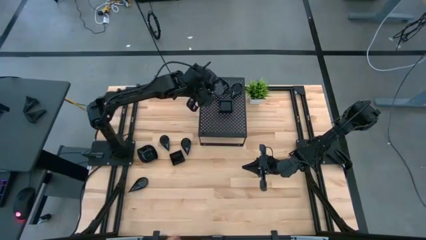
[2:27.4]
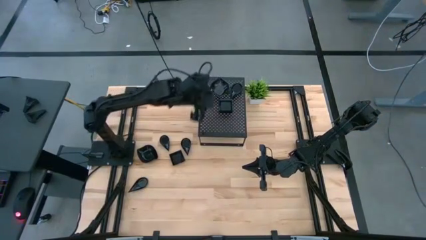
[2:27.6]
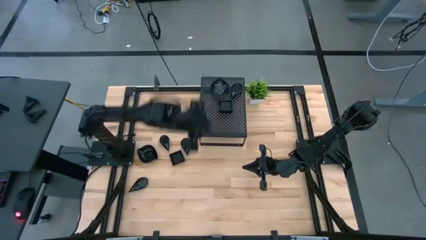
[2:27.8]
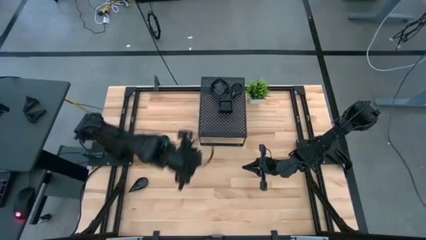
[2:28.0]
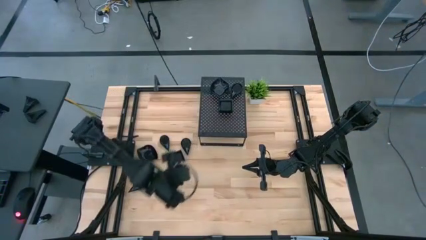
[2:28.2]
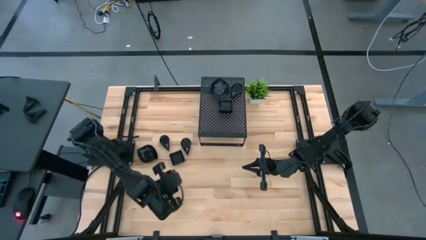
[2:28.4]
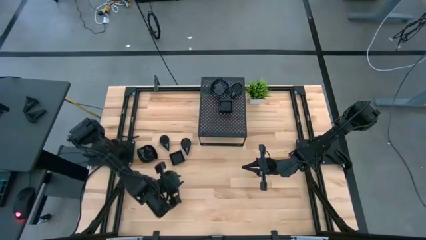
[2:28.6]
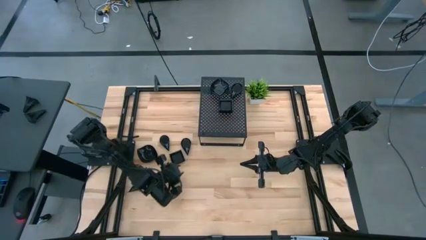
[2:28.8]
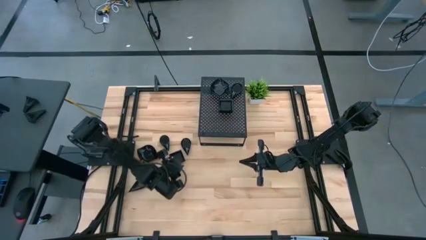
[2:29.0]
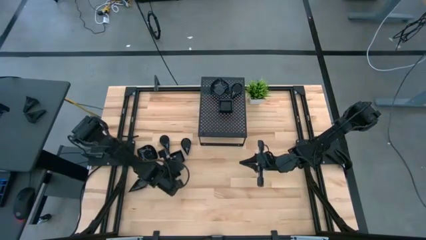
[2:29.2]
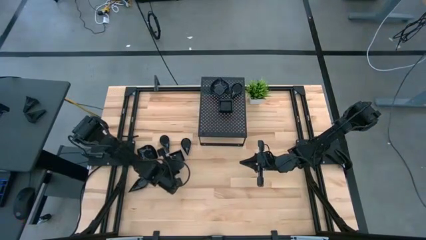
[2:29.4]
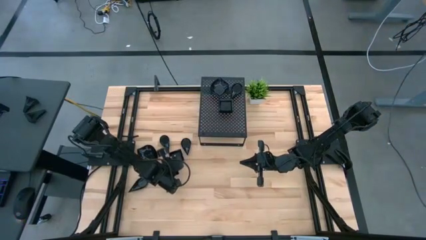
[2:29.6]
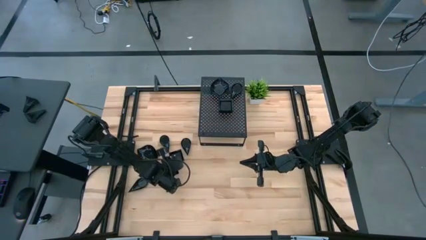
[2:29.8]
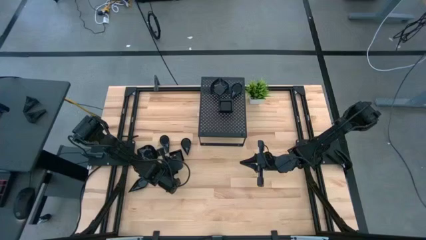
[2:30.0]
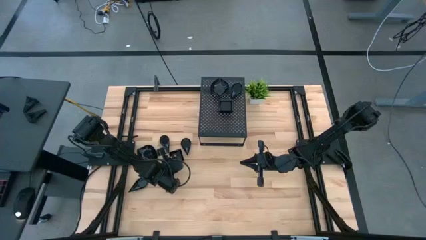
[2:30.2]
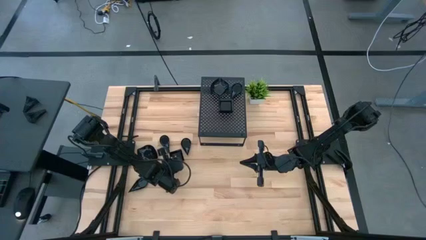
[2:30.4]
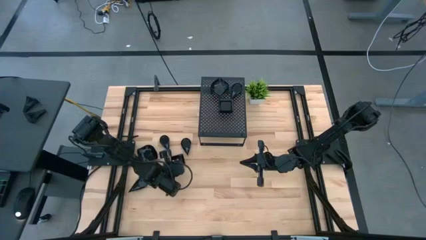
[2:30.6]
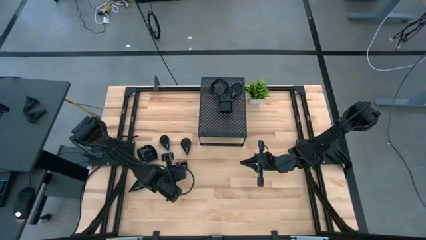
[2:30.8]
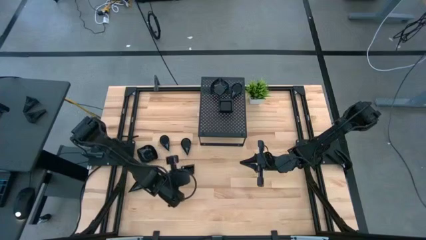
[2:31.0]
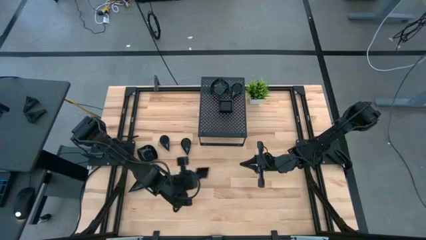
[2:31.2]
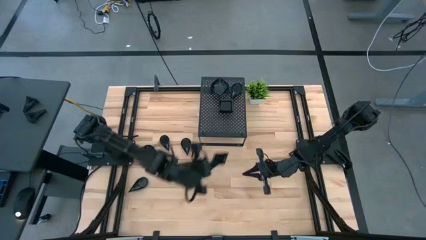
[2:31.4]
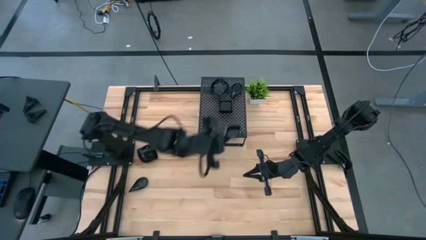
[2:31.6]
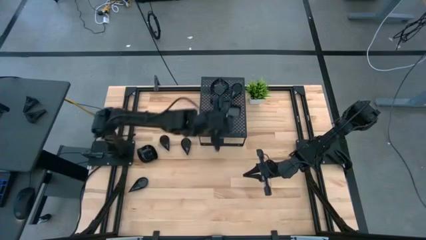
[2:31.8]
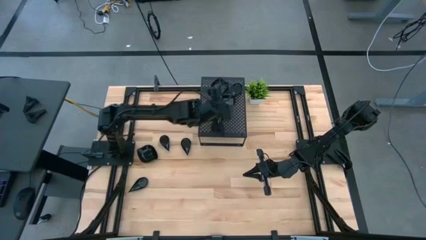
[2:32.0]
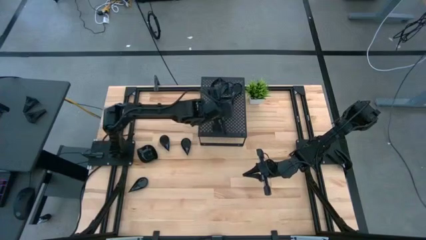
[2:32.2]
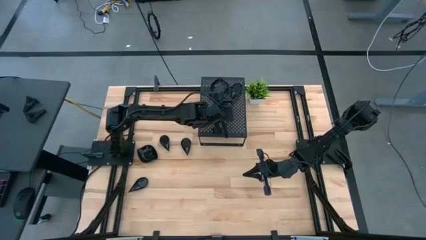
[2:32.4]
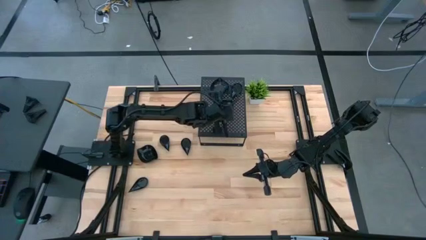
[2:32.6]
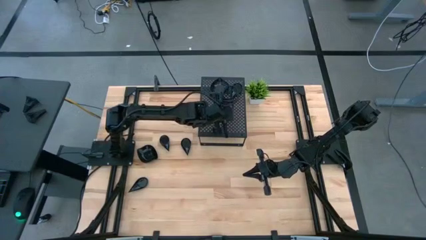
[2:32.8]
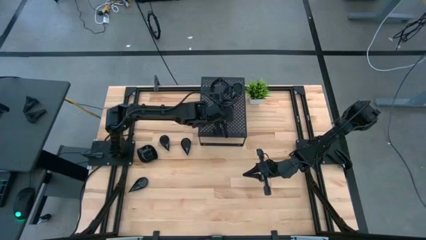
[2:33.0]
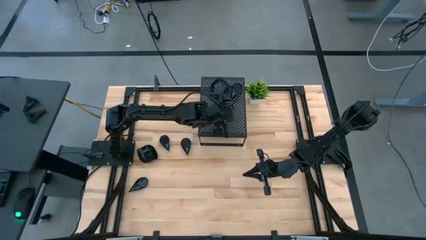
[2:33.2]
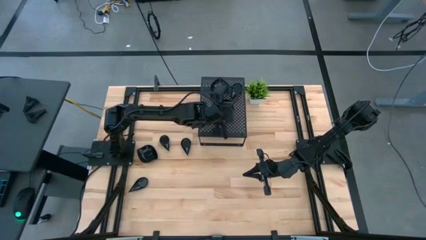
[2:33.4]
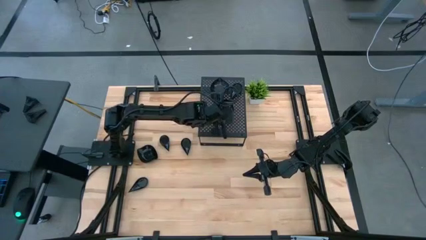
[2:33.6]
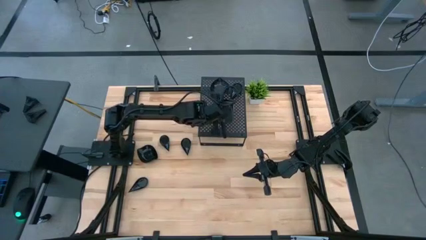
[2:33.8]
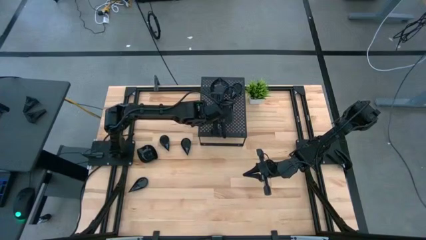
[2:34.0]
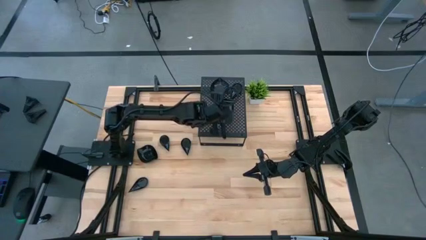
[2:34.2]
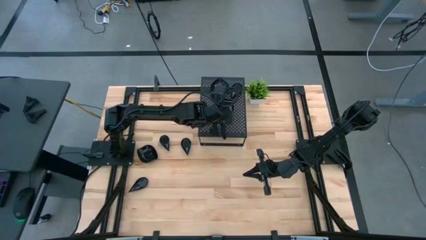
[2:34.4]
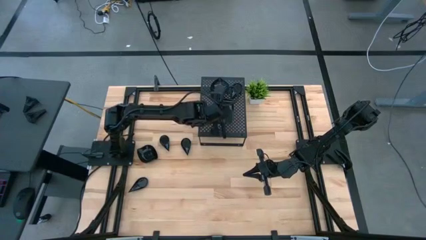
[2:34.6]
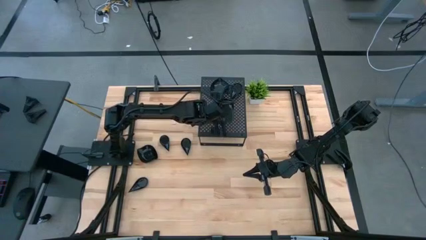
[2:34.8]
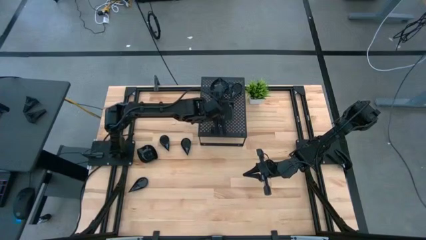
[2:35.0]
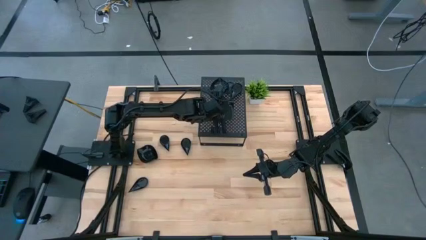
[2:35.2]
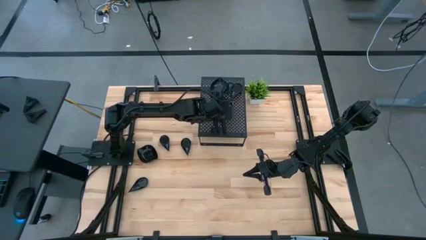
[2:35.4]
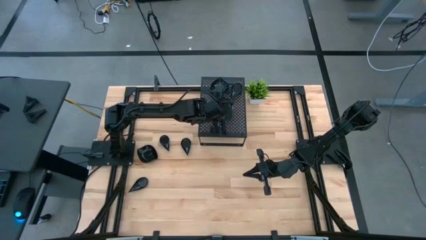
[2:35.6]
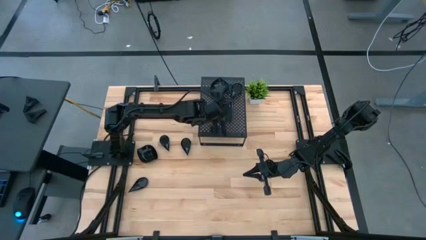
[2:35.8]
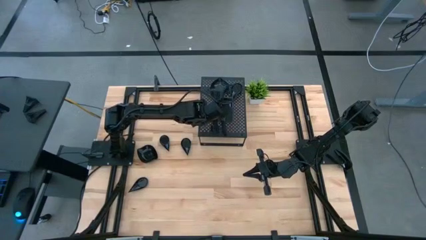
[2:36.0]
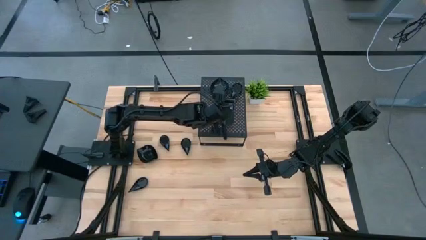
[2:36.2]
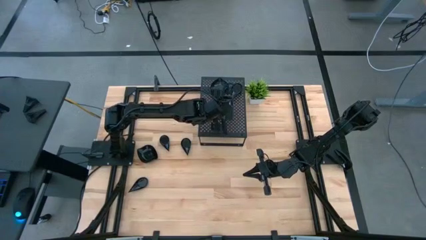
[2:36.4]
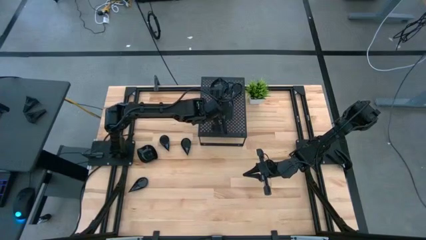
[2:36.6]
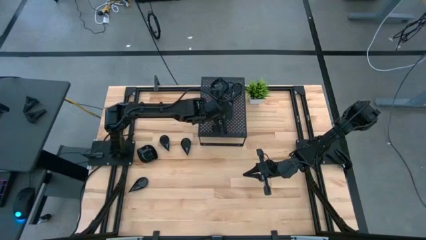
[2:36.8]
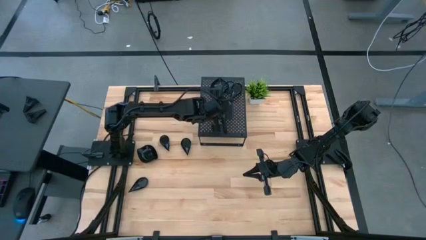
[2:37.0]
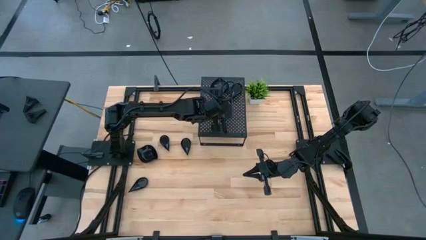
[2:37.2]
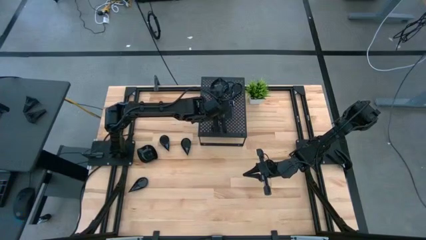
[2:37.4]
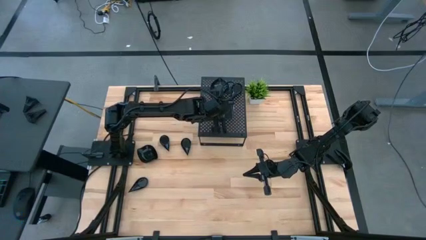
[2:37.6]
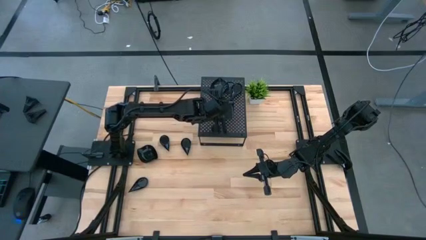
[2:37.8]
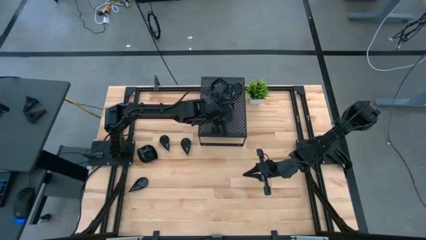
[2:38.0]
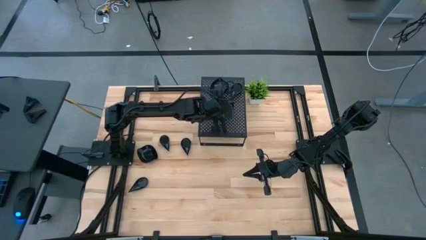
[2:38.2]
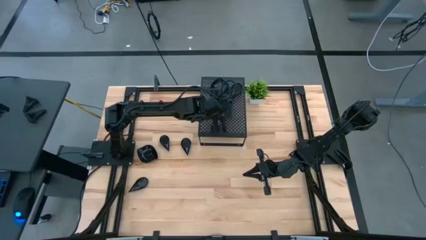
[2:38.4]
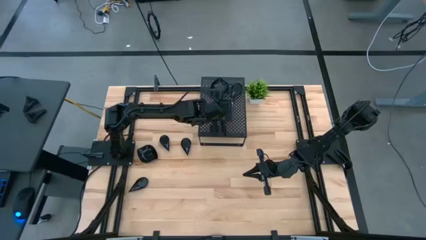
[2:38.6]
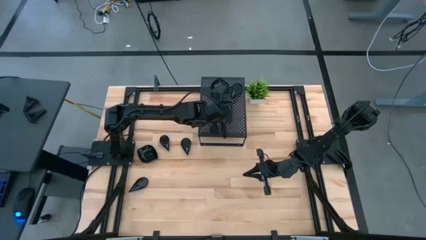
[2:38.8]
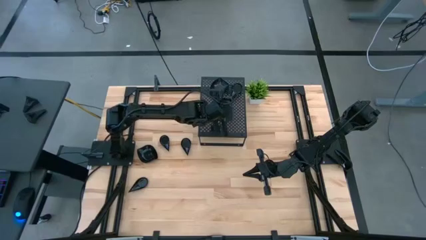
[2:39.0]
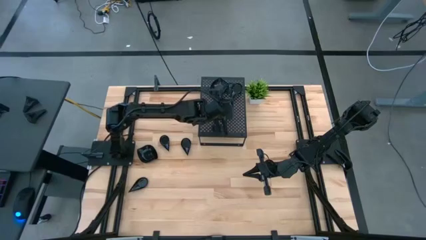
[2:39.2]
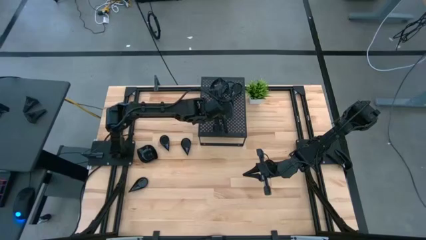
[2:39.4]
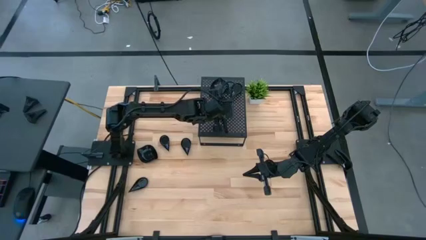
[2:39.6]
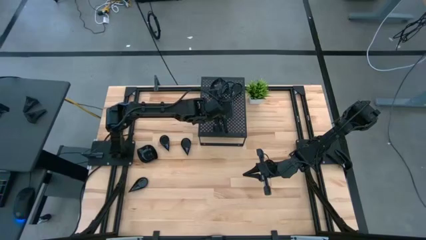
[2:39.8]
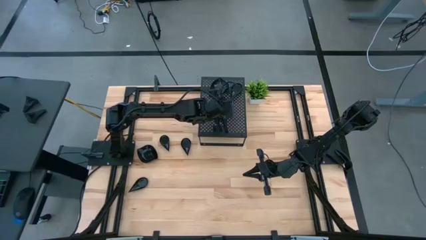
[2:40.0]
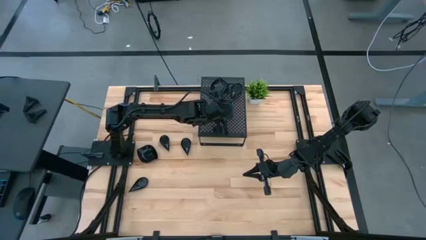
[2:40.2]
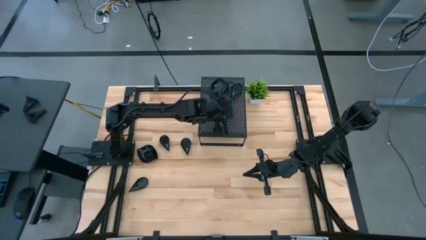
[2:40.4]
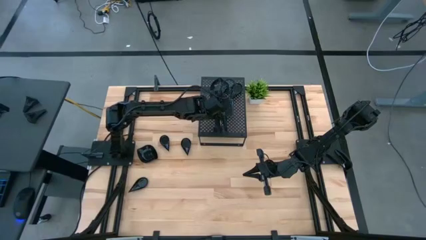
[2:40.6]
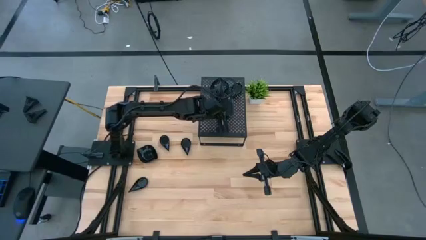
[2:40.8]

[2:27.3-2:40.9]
Task: Pick & Place Mini shaped plates
Stack the black square plate on top of the black square plate on the shelf
